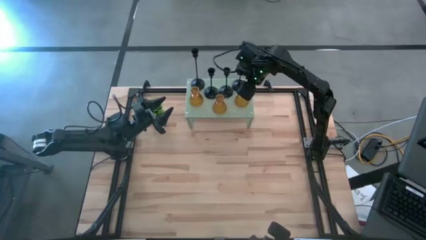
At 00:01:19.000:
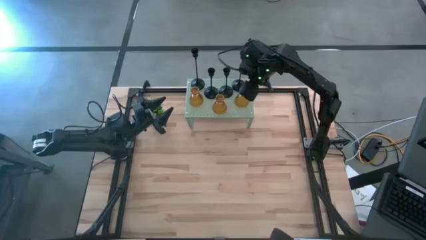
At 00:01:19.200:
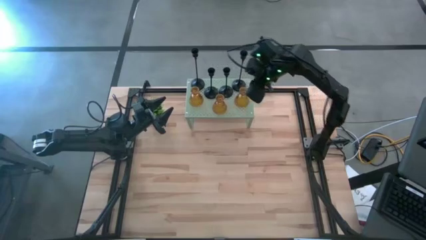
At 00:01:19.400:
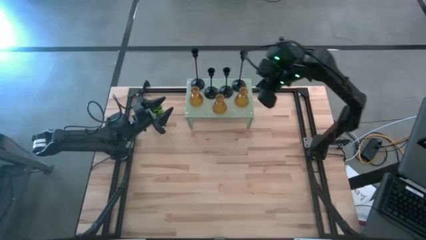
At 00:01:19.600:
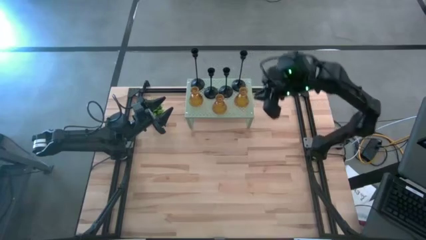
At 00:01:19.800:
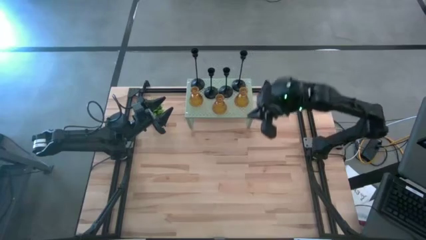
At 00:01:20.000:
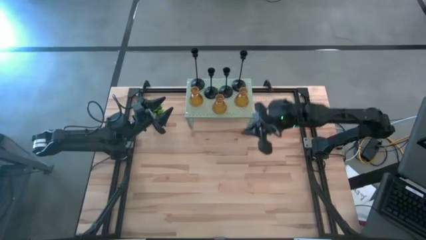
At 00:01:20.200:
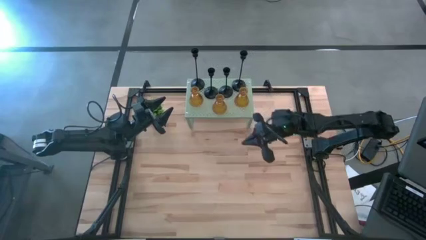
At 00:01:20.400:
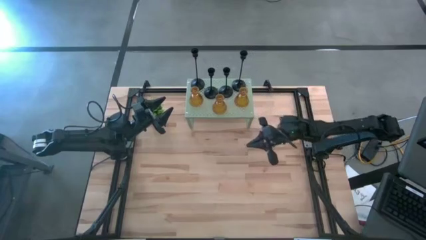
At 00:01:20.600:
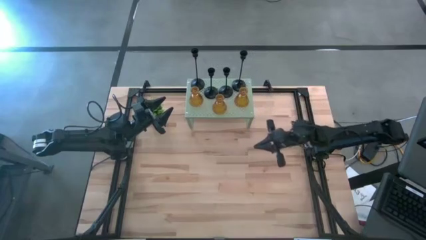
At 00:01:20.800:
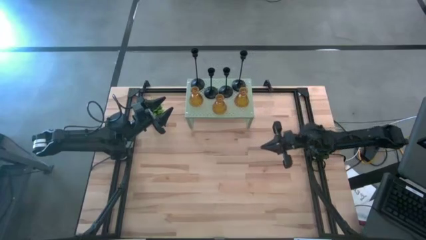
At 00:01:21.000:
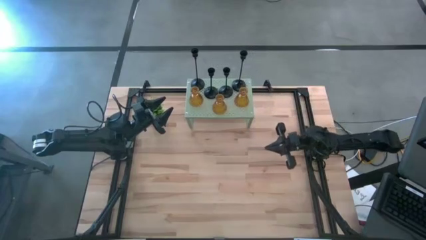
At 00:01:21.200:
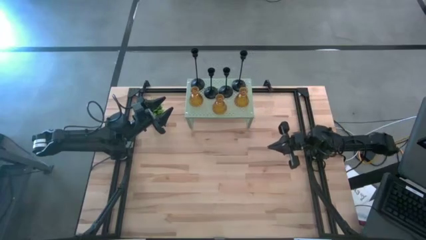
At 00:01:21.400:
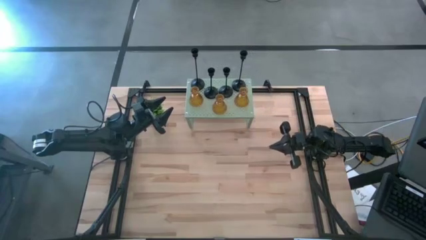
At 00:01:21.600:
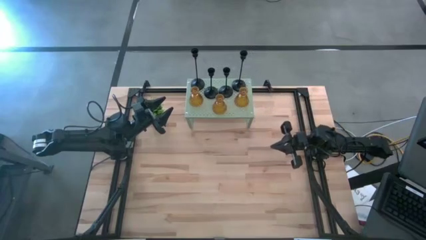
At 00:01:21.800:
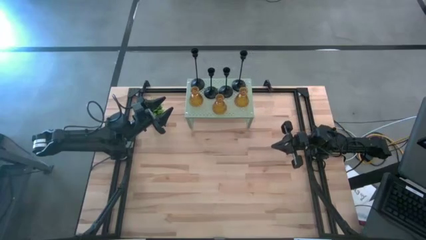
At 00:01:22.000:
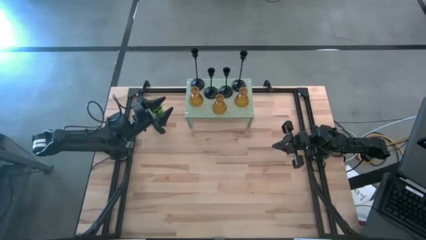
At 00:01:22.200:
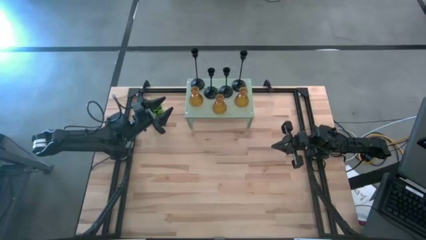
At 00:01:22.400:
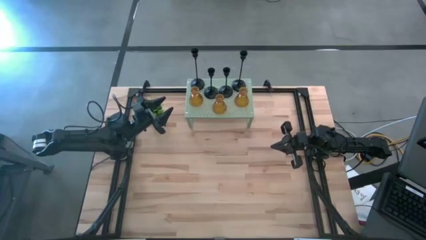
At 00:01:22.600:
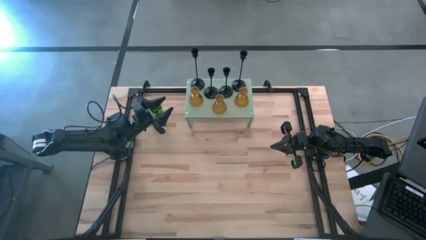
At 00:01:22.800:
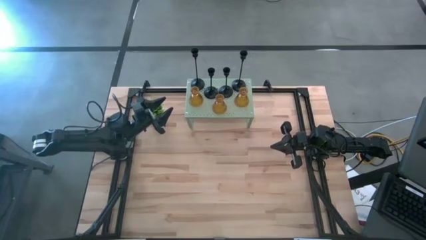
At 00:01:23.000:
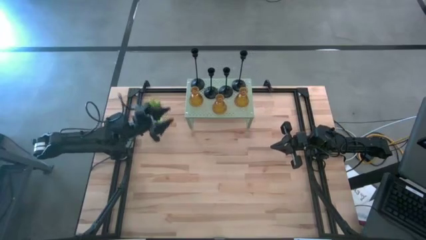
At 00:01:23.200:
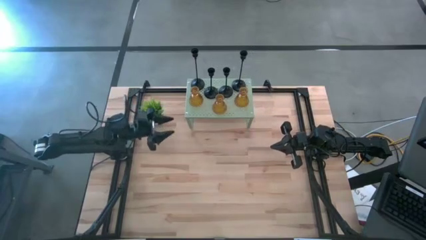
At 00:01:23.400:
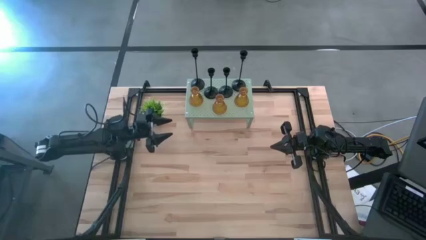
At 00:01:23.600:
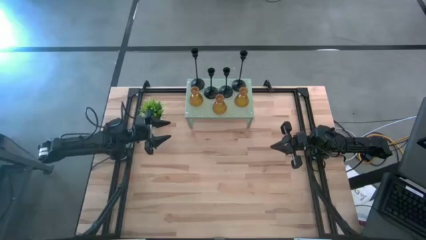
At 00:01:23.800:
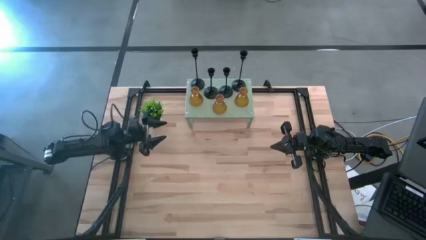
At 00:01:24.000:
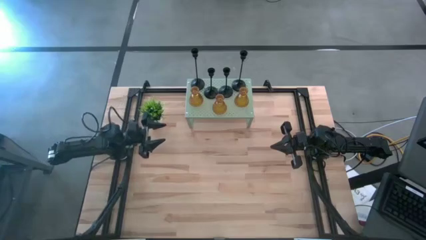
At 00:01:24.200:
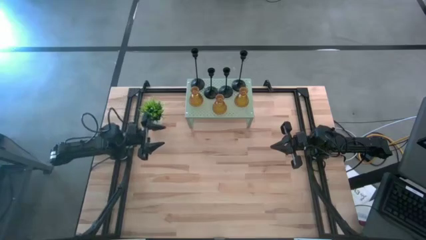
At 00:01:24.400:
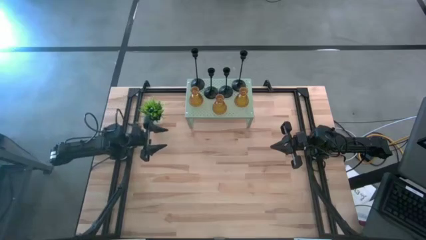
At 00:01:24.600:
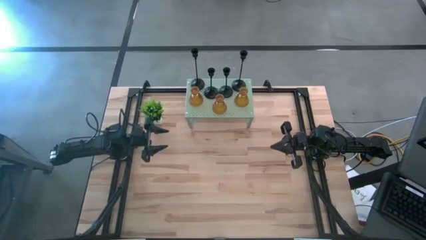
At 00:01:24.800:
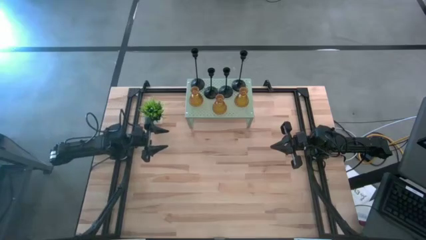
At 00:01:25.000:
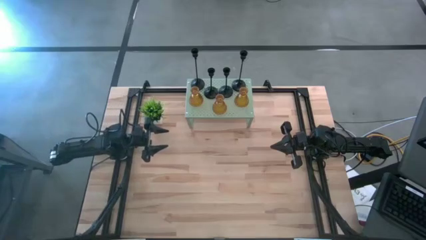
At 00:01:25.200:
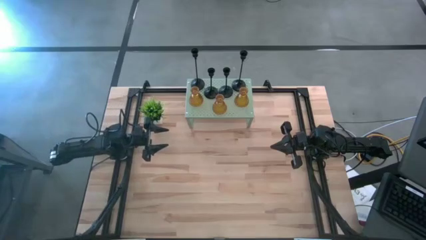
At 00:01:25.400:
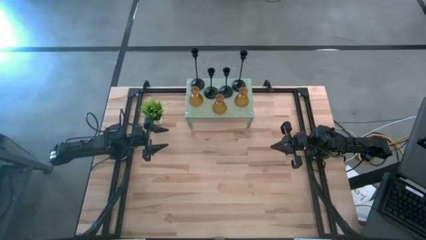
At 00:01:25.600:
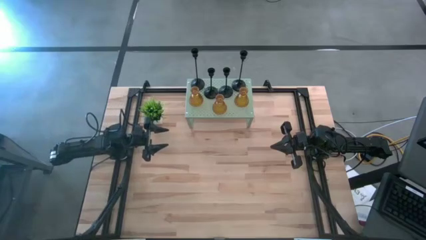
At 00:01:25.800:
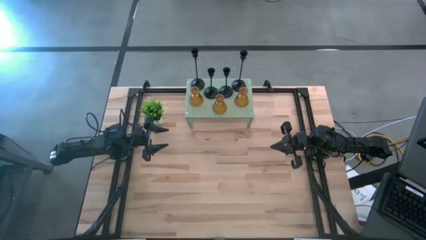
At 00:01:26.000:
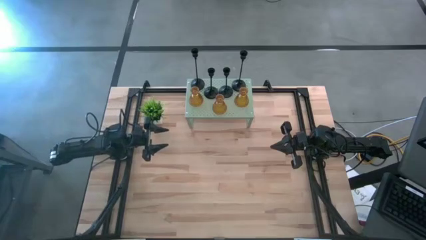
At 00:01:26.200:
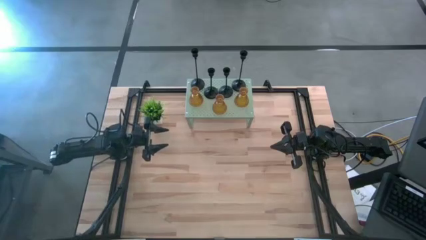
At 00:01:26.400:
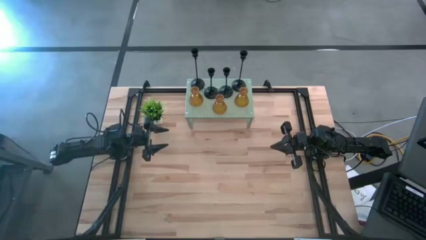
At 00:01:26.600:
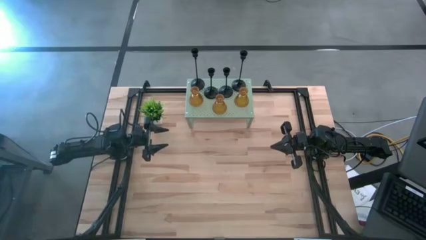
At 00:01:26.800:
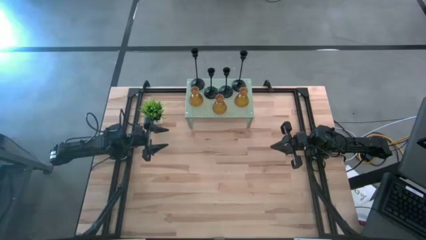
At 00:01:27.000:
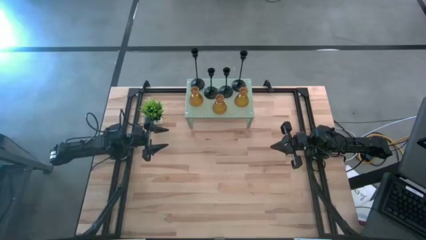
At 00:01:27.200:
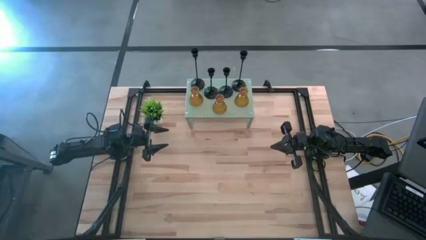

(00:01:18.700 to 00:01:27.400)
Task: Pick & Place candle stick holders
Return to Home Position

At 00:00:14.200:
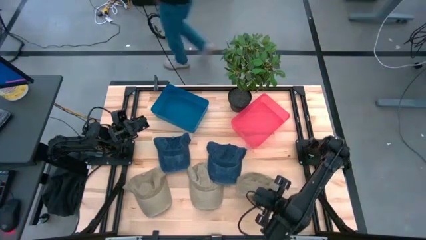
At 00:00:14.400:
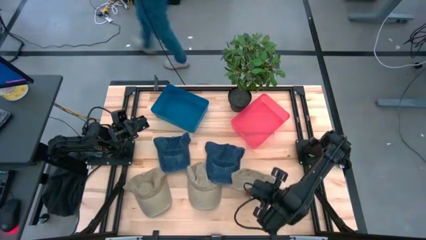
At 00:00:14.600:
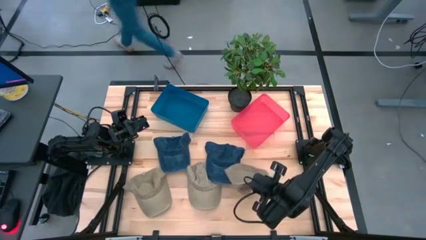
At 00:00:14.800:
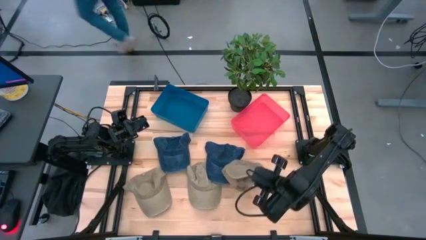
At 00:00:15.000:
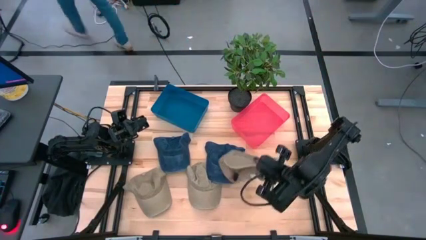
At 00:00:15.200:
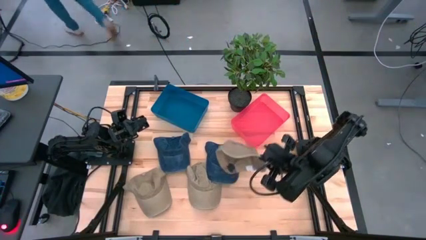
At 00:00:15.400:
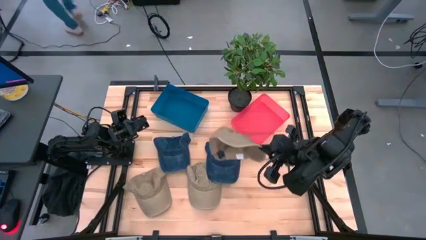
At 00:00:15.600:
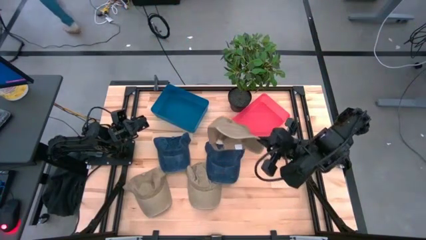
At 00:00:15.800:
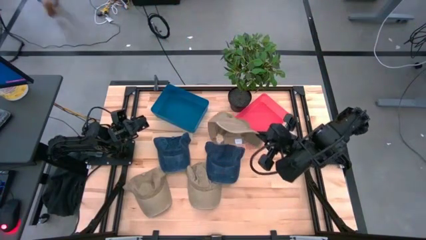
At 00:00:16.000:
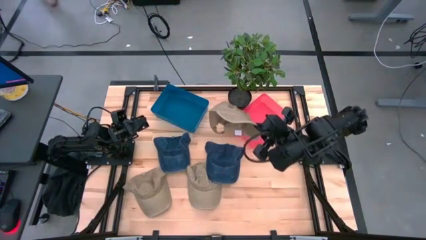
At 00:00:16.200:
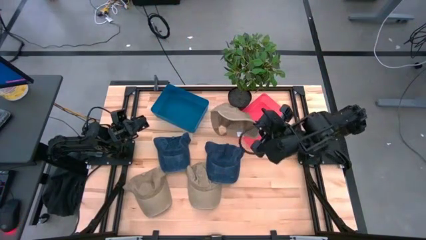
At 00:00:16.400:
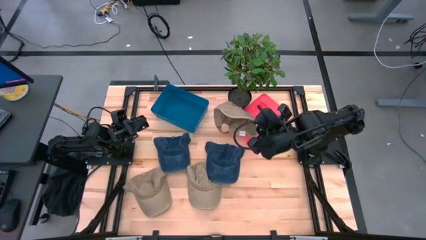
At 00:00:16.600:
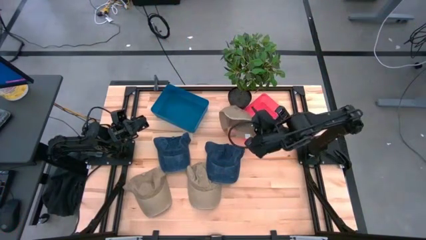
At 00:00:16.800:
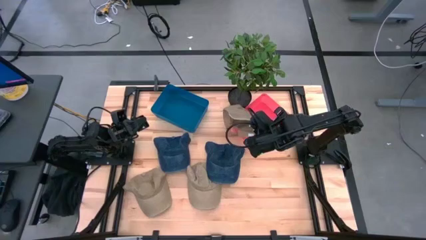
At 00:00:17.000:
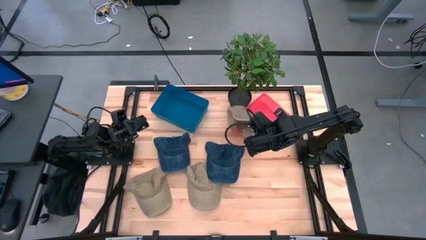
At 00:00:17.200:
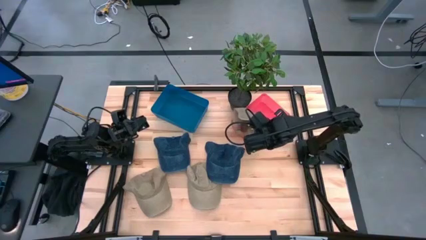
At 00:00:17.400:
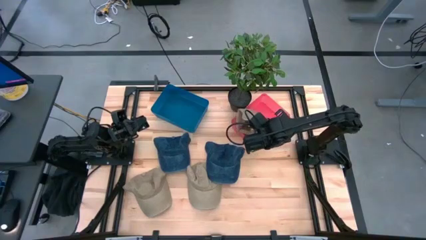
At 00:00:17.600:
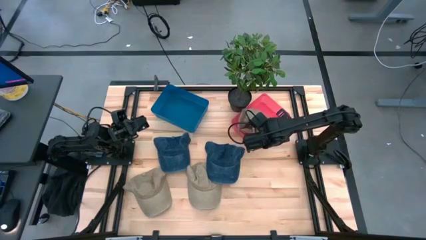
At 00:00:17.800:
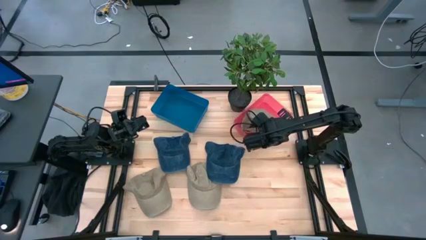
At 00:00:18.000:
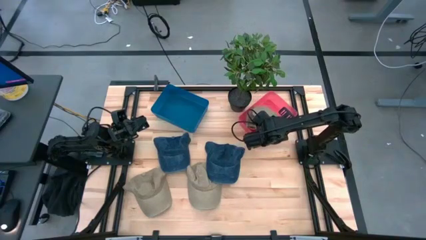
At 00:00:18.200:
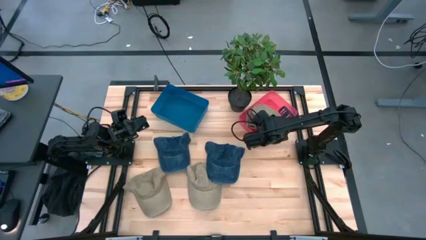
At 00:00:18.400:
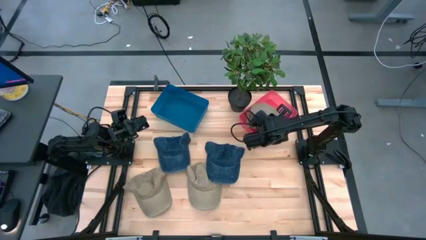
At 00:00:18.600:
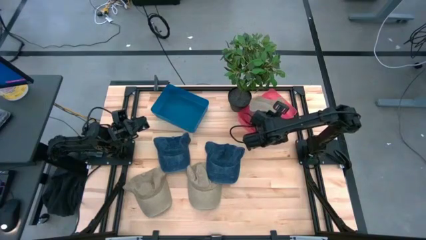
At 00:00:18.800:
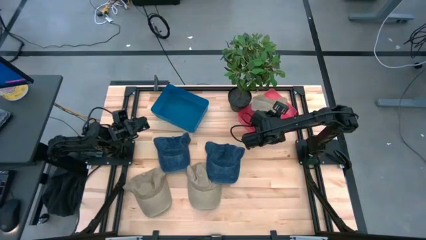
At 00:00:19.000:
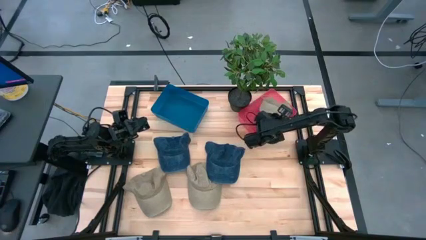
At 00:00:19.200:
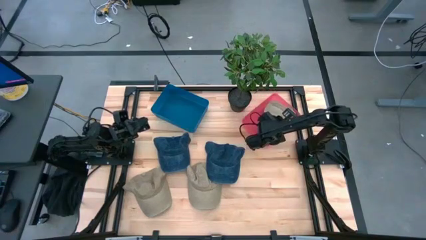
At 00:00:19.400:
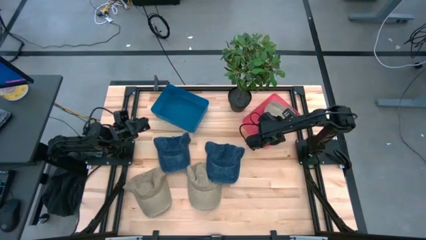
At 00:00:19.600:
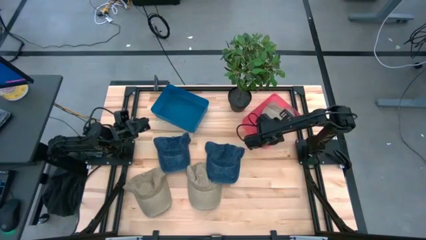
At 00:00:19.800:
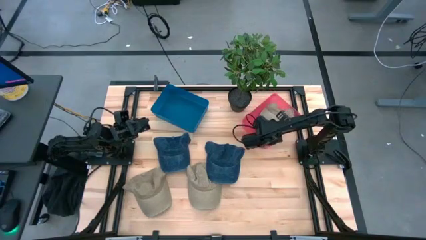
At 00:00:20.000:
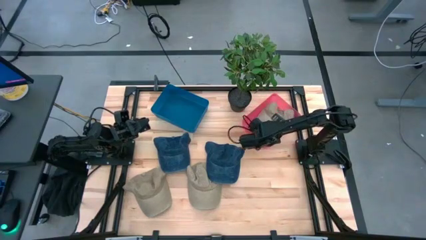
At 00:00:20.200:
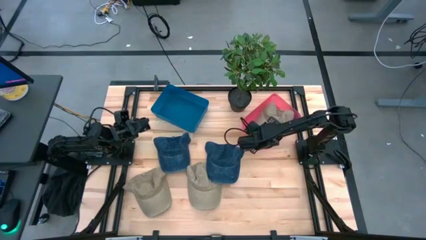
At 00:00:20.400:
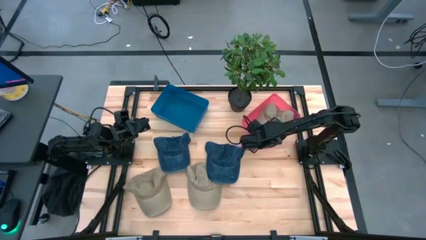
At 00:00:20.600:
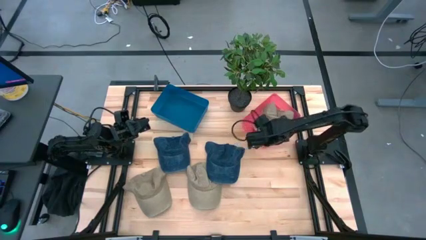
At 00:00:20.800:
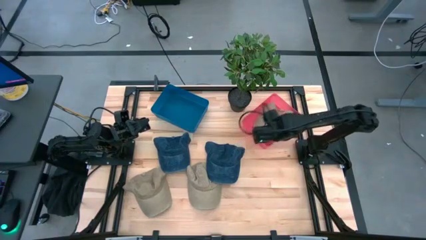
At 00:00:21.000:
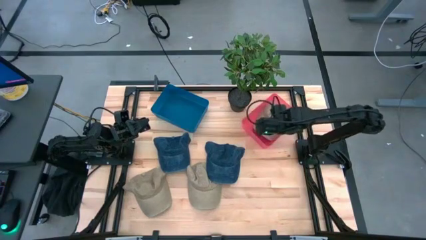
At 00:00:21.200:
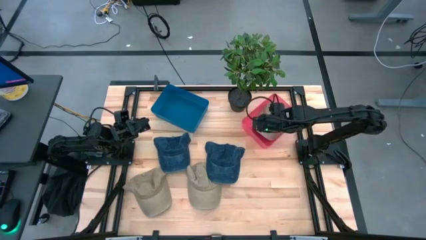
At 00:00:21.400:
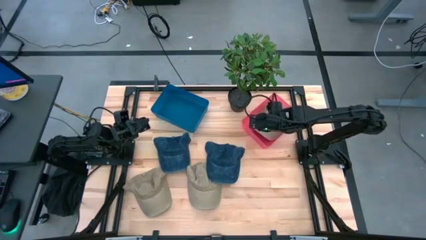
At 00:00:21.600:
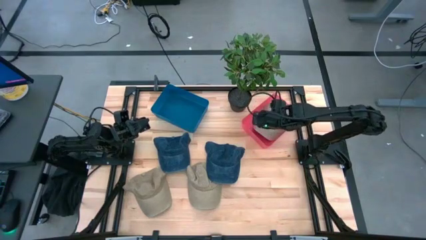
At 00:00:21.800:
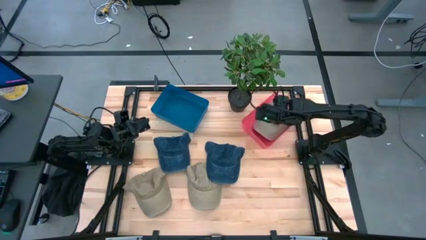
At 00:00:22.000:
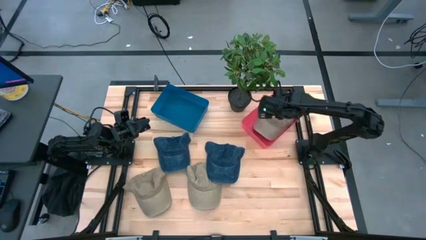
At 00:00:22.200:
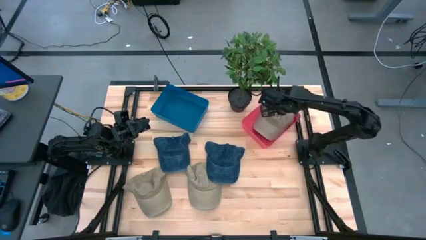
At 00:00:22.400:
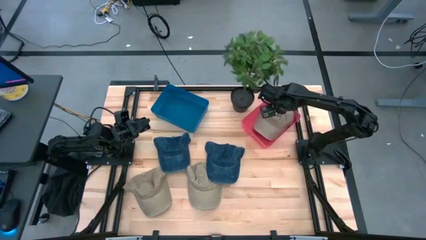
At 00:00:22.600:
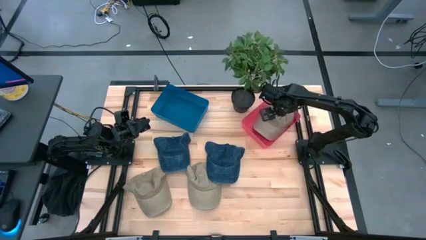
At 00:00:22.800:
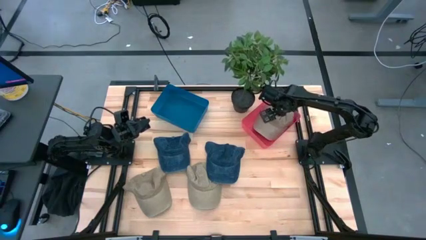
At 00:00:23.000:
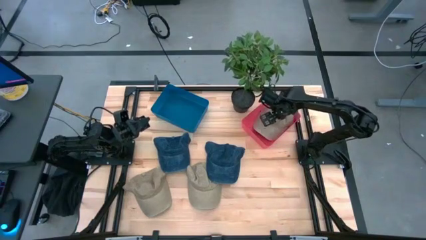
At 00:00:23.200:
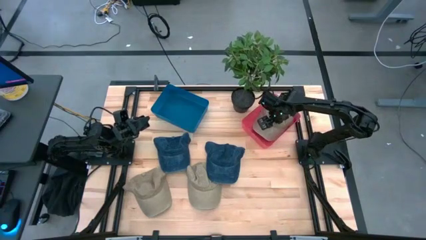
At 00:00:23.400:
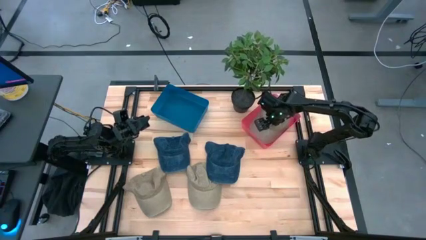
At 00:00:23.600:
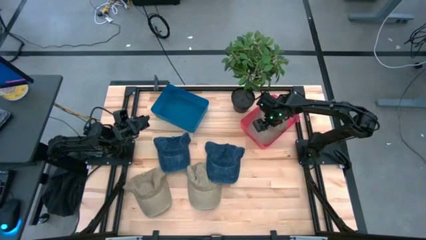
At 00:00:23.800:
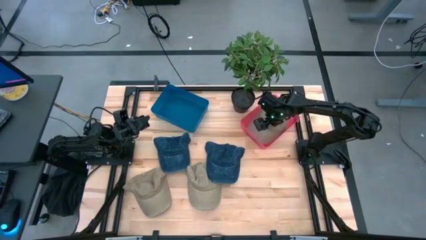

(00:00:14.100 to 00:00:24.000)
Task: Pick & Place hat
Put the right brown cap into the red bin
